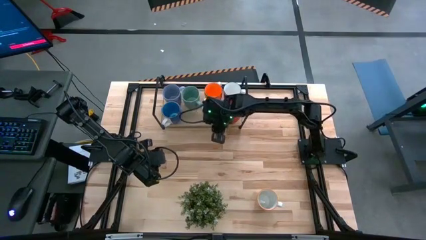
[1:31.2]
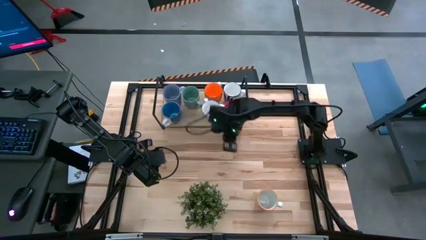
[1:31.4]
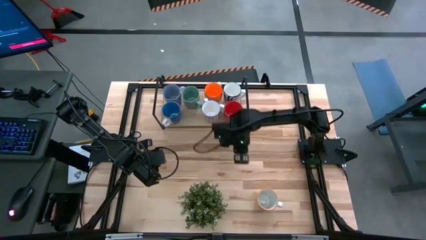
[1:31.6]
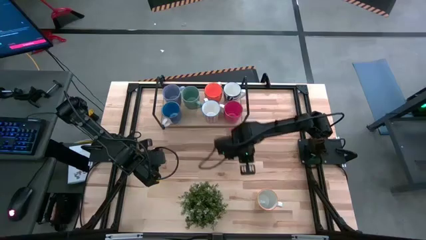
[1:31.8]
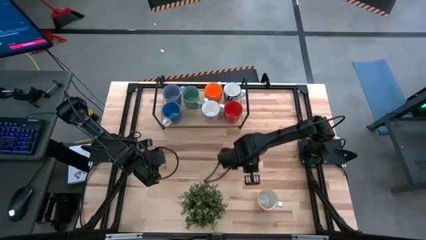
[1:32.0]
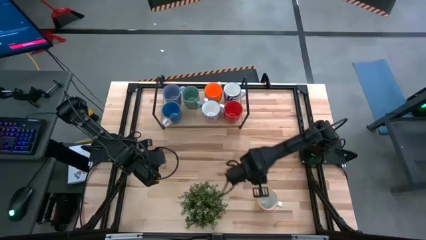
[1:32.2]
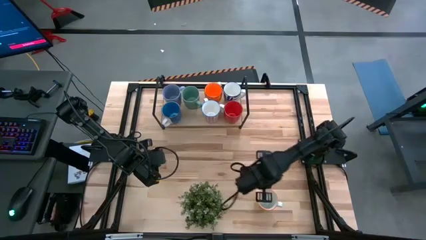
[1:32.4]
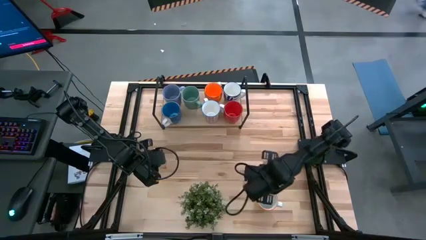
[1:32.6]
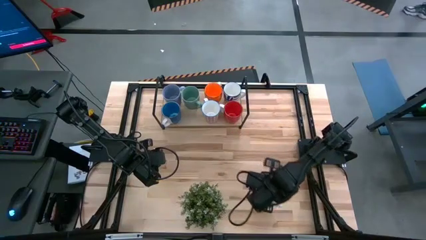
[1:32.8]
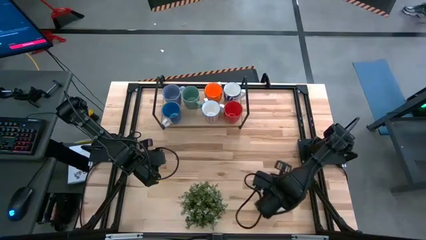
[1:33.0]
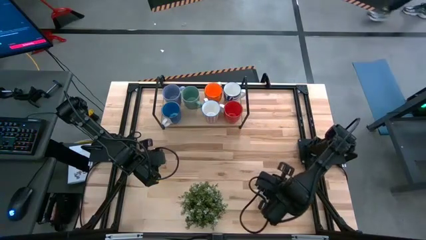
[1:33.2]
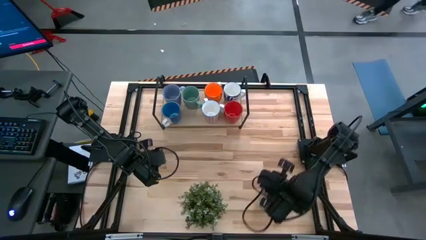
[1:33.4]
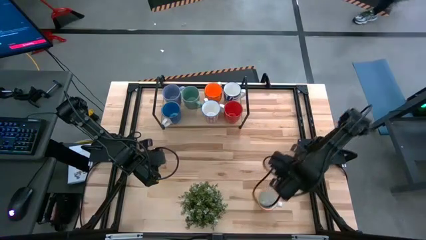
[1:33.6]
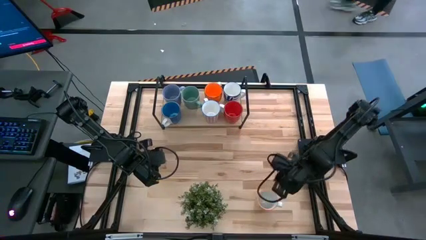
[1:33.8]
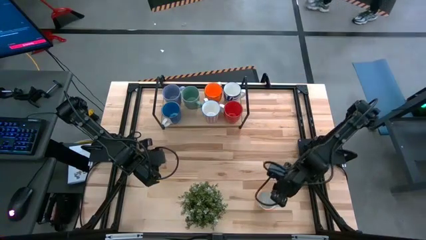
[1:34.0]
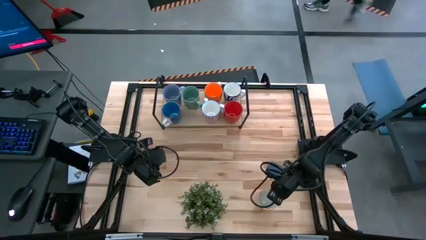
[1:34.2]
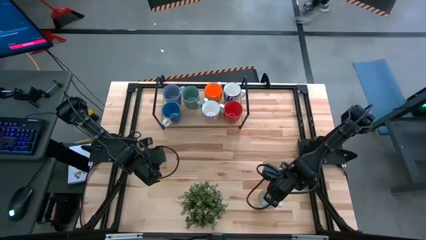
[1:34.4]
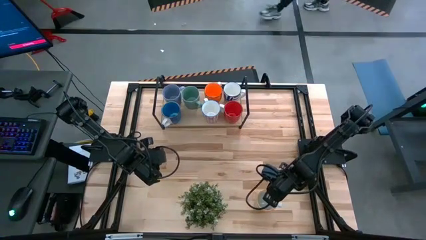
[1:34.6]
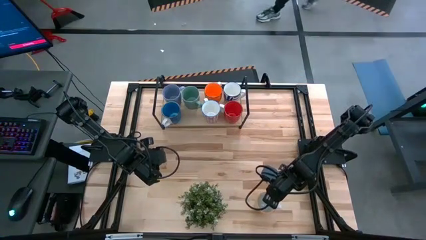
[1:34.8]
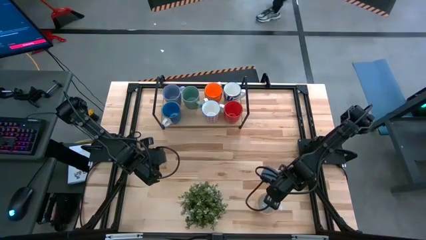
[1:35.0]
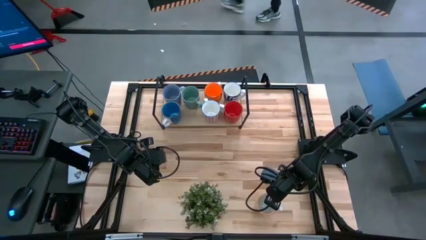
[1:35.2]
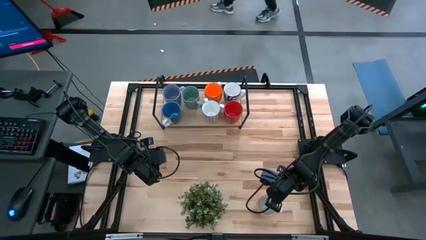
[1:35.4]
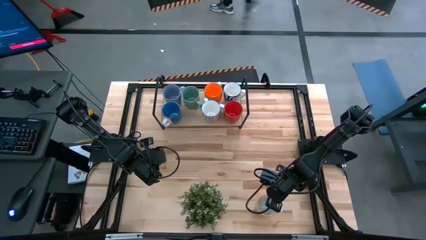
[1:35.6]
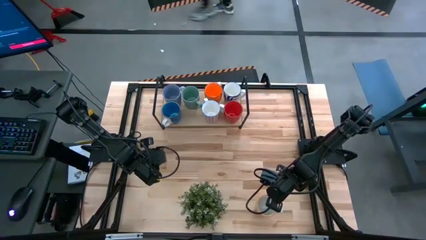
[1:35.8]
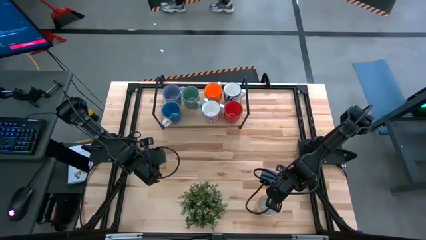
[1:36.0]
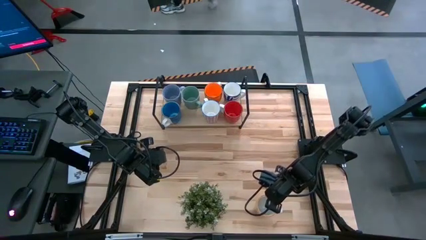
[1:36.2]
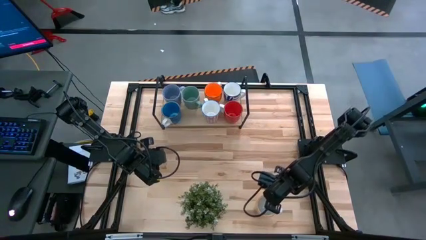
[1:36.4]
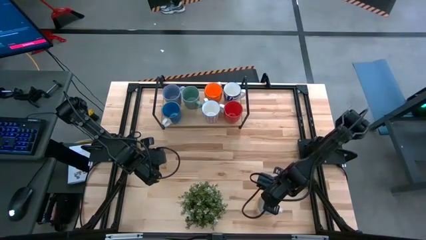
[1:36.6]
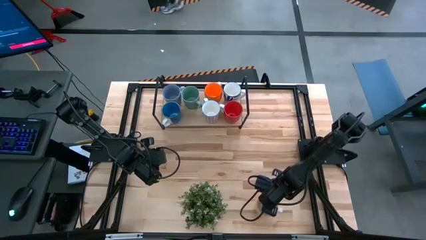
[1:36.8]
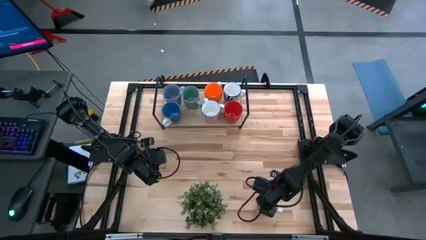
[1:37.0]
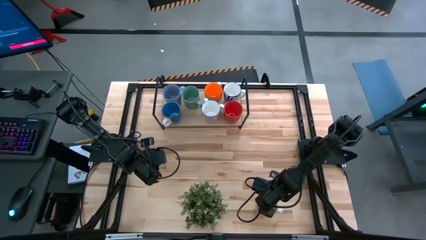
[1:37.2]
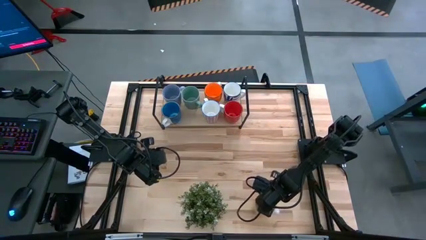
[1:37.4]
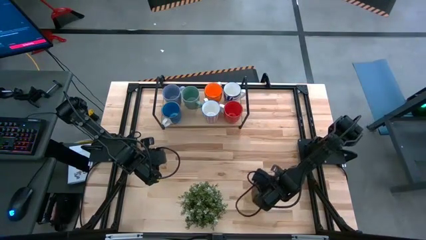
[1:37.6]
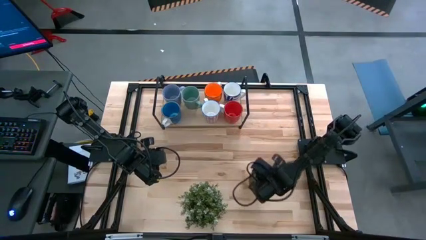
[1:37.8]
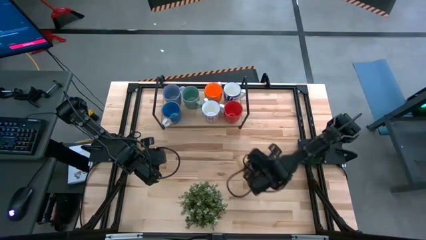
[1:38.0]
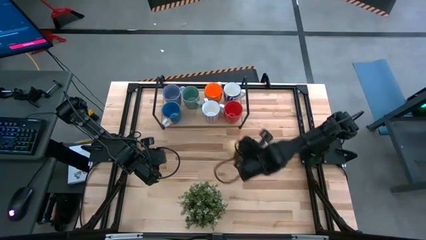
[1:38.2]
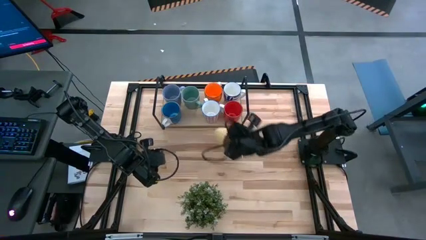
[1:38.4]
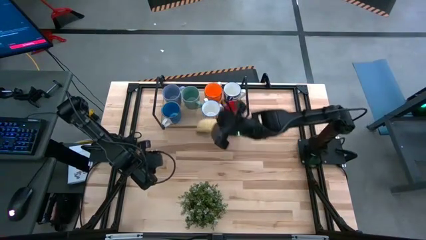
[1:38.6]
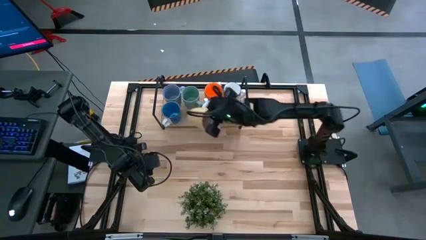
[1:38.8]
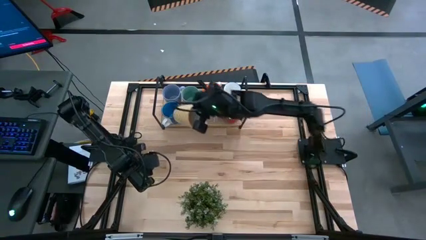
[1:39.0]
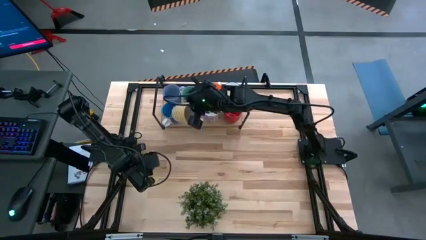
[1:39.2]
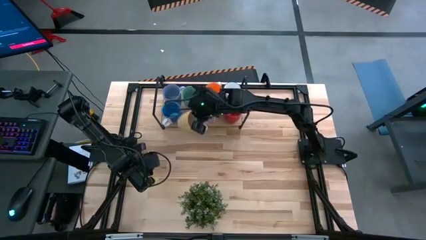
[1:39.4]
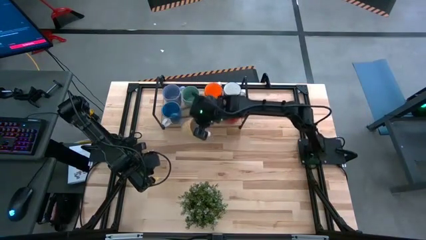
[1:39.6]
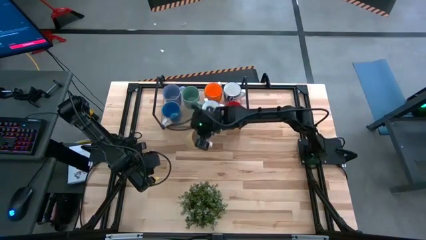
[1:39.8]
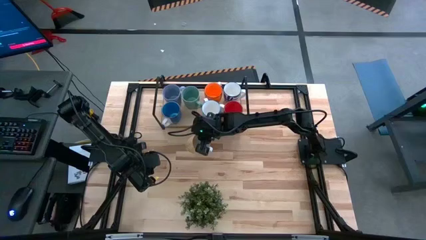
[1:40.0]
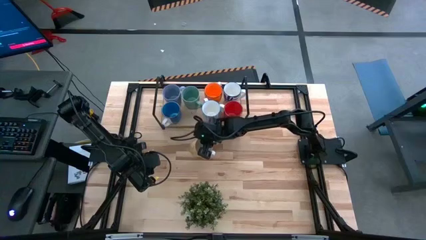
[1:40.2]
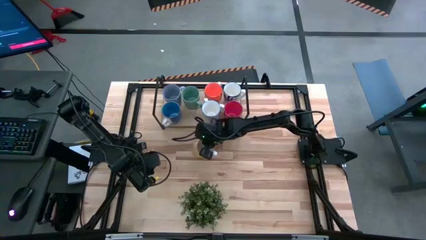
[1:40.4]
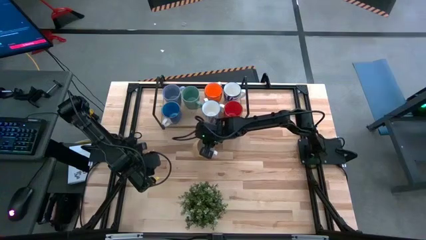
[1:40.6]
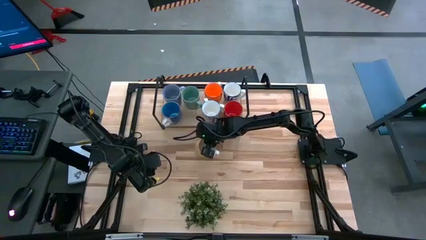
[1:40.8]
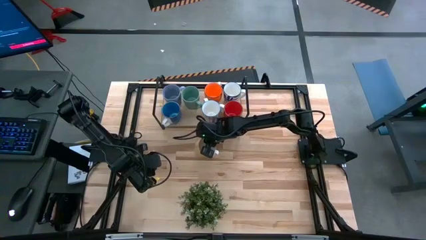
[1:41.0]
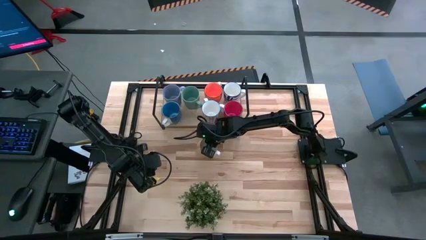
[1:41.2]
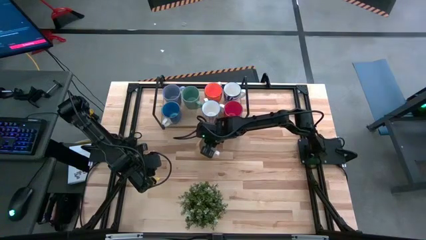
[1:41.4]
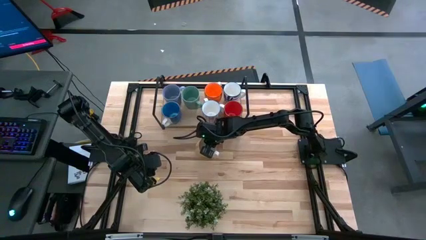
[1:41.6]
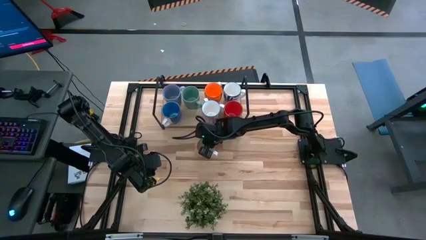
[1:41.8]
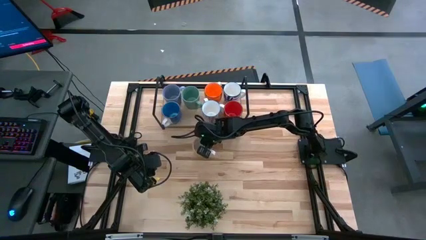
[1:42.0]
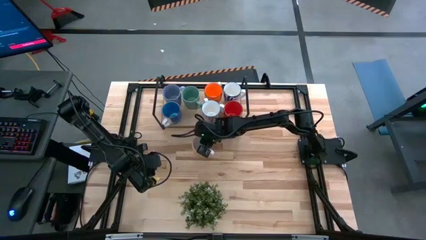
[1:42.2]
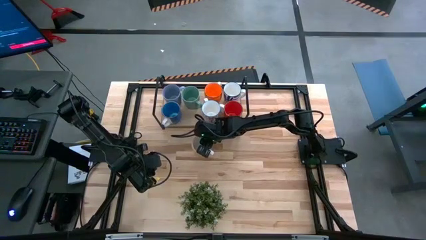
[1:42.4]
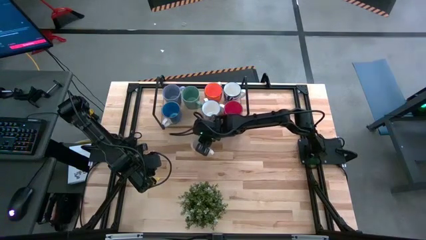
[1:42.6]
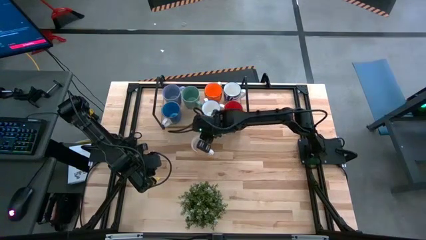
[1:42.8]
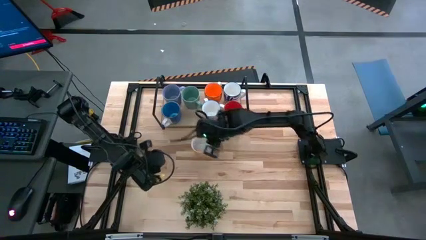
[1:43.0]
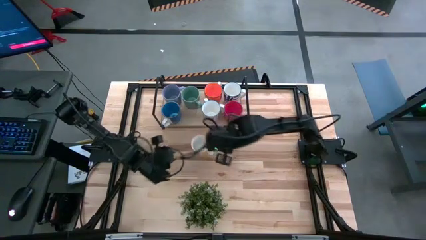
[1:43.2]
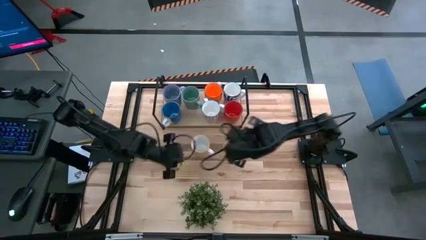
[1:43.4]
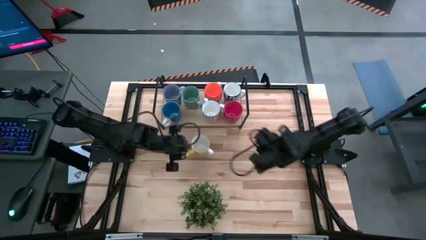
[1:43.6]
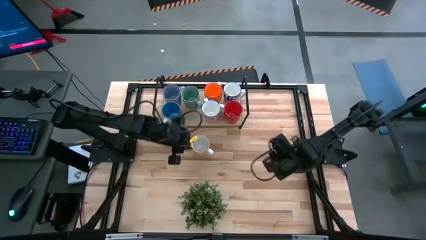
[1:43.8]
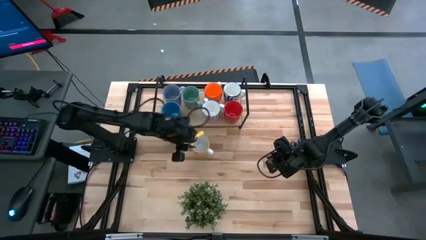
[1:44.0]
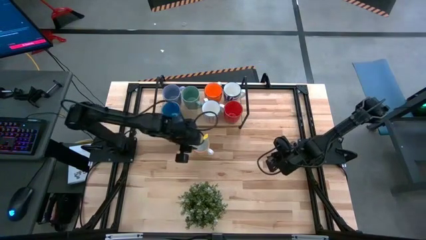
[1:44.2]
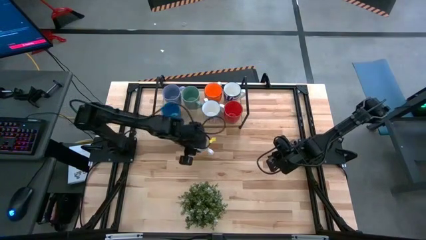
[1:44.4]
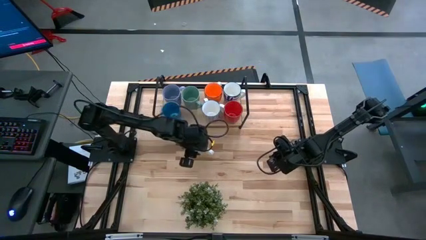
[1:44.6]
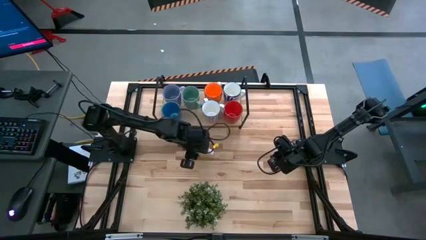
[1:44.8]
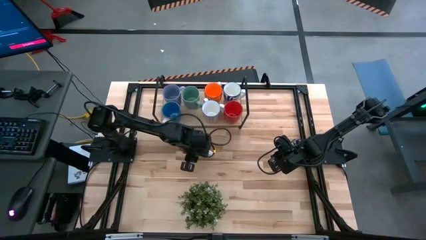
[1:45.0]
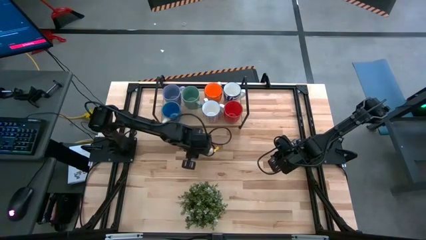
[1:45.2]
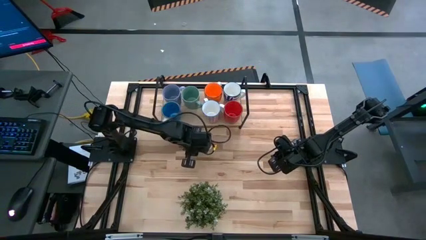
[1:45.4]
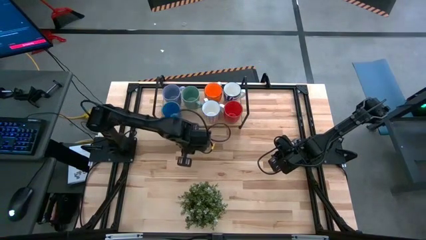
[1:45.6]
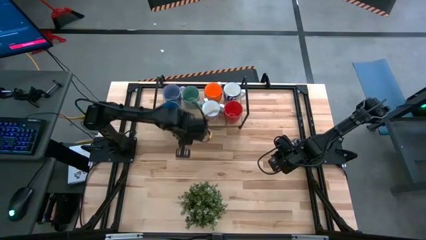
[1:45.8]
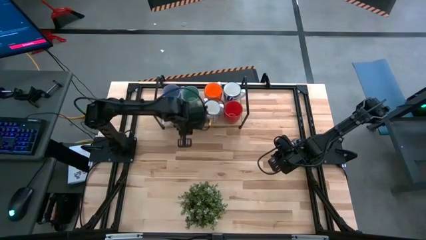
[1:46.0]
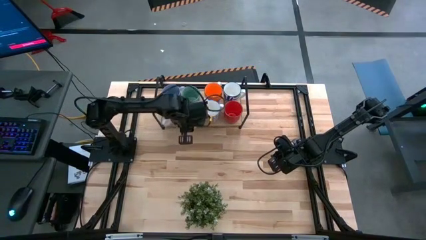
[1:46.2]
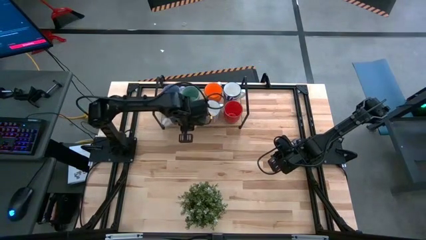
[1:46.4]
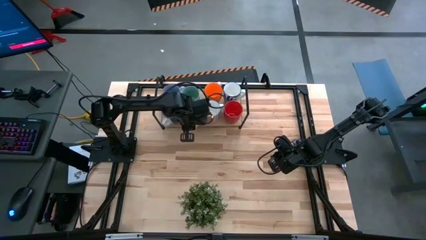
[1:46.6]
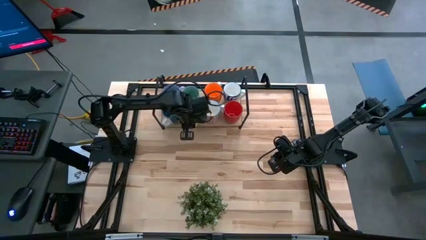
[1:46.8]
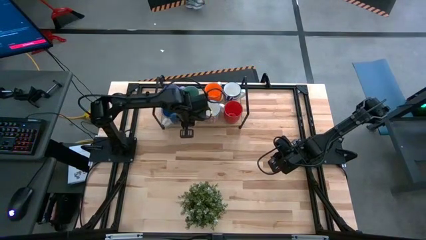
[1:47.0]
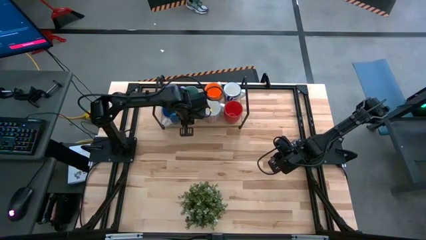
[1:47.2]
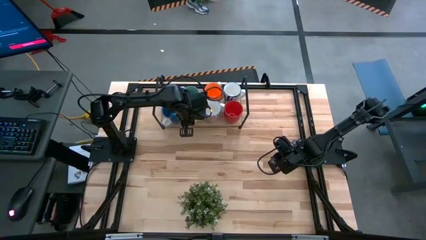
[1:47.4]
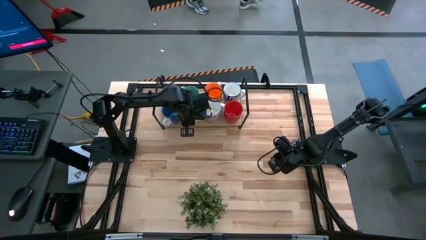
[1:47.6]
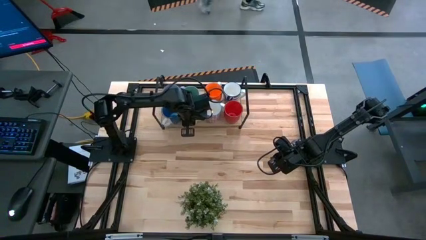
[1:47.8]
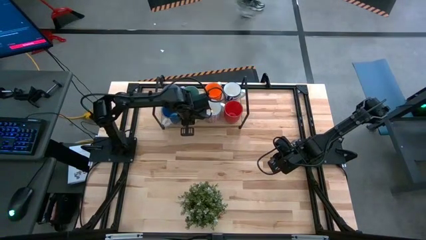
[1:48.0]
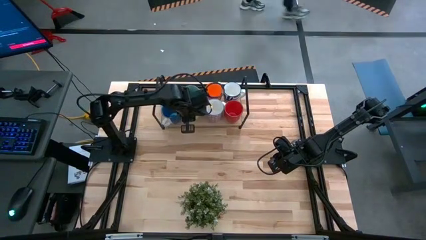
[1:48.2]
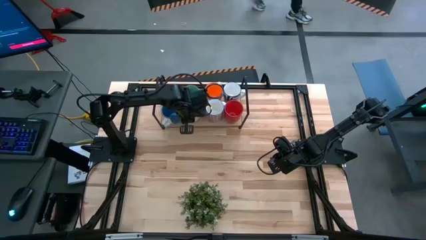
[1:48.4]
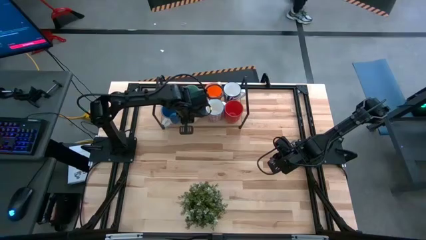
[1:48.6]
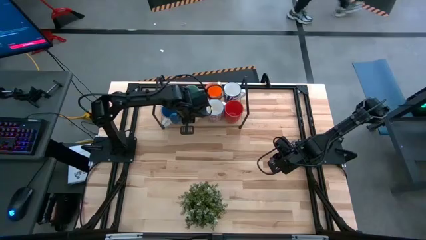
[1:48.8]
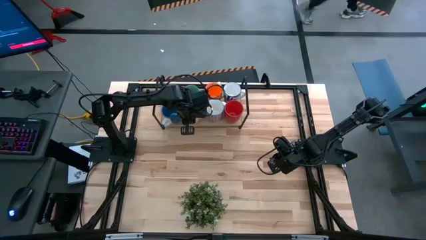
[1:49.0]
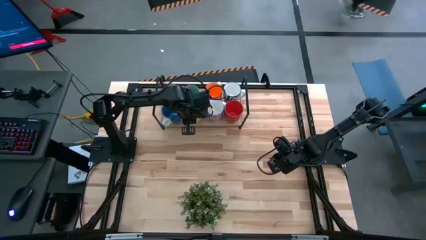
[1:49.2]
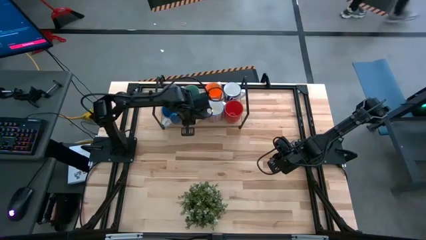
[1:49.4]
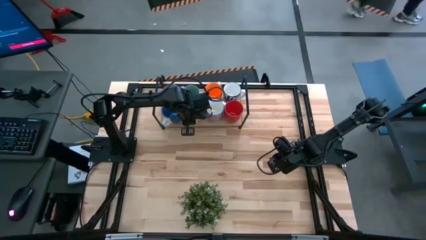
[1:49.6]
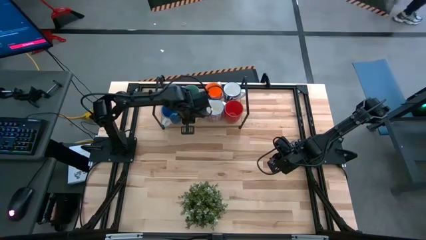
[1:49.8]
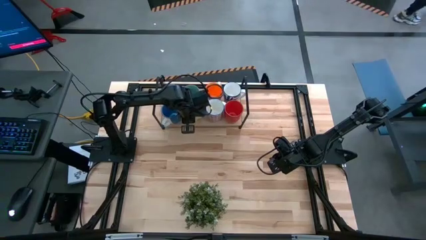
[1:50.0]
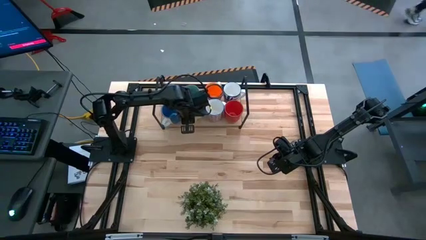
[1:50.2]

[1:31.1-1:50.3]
Task: Place coffee mugs
Put the yellow patterned mug on the shelf
